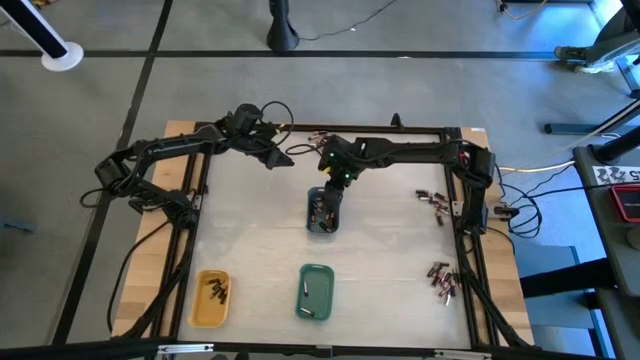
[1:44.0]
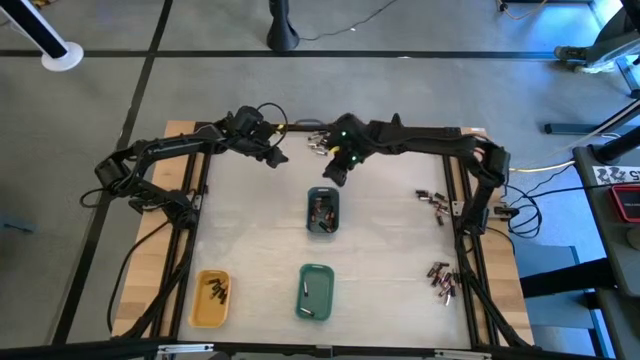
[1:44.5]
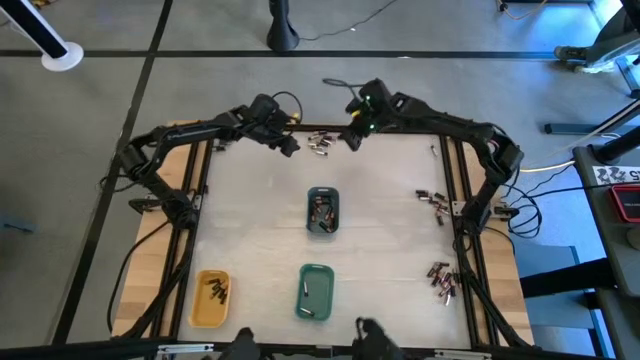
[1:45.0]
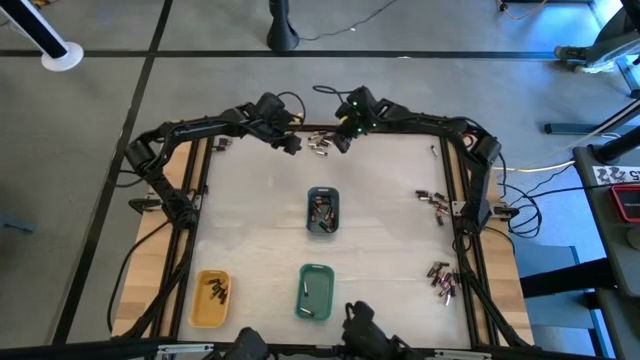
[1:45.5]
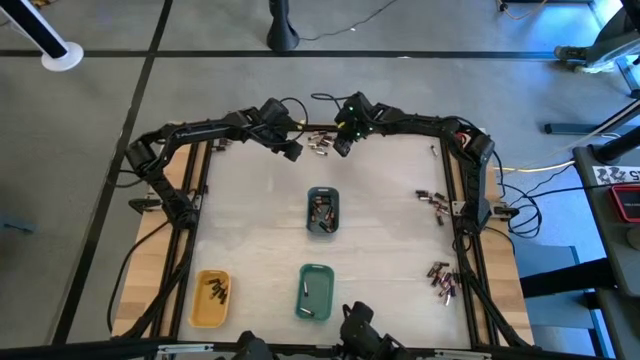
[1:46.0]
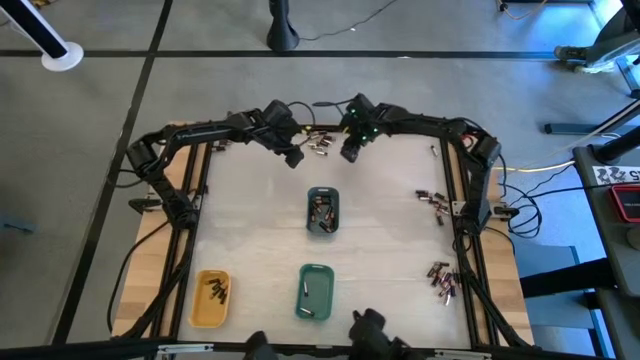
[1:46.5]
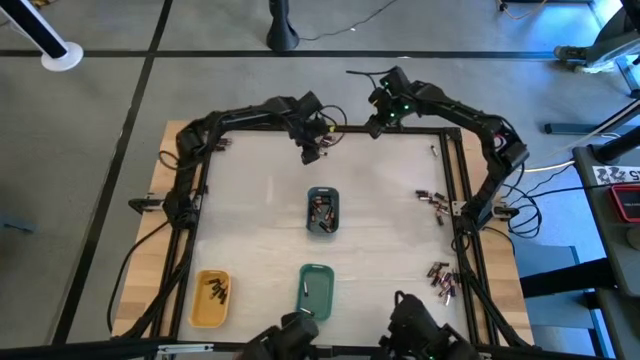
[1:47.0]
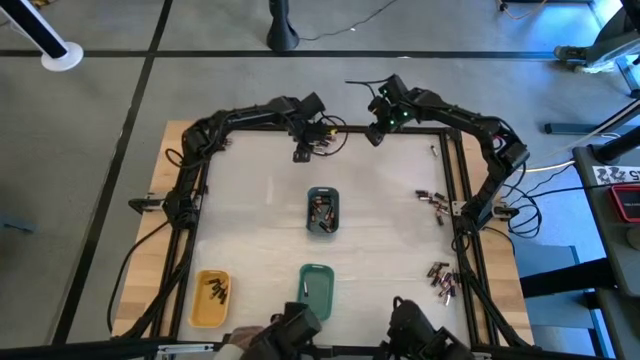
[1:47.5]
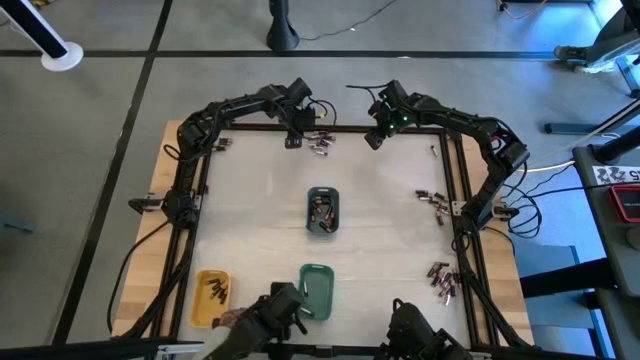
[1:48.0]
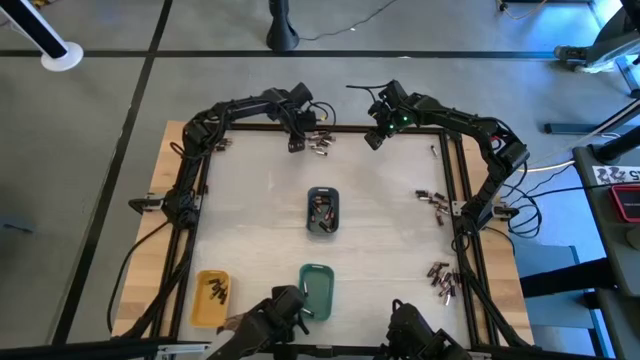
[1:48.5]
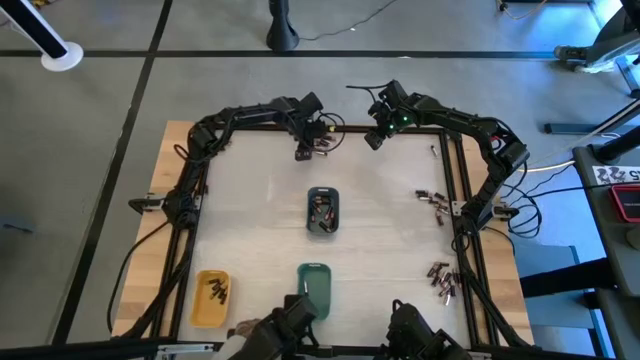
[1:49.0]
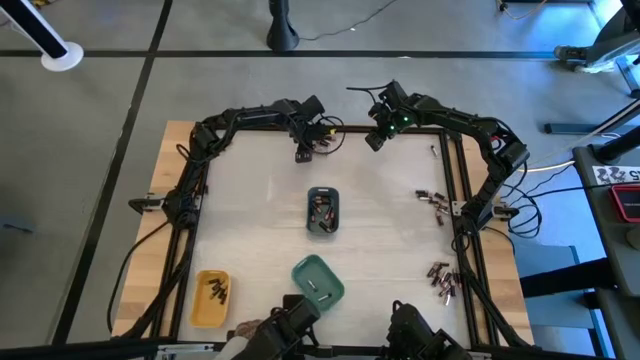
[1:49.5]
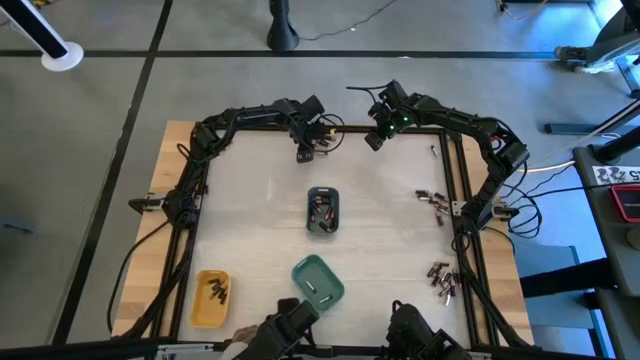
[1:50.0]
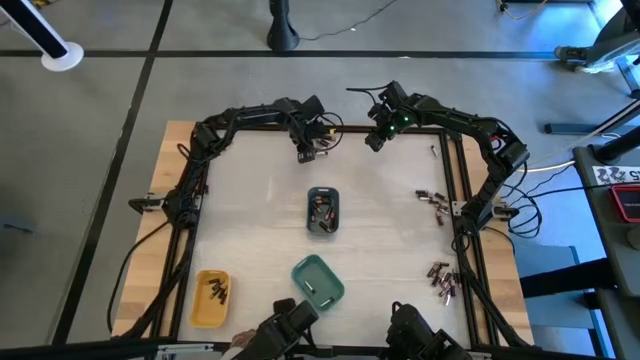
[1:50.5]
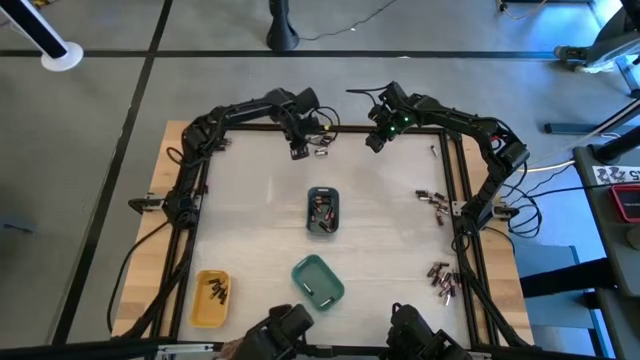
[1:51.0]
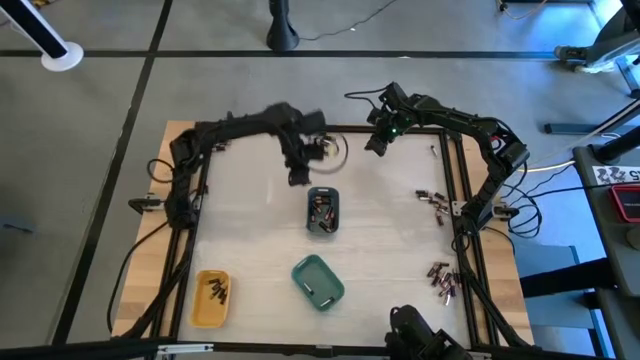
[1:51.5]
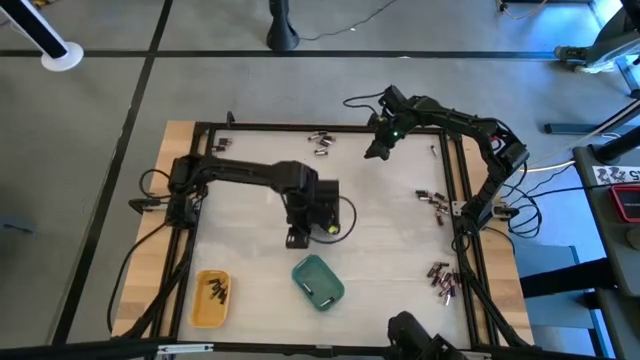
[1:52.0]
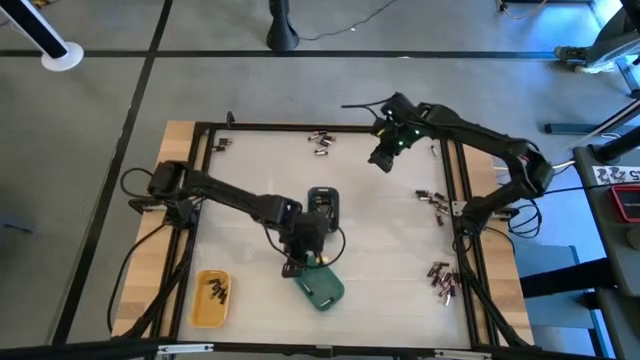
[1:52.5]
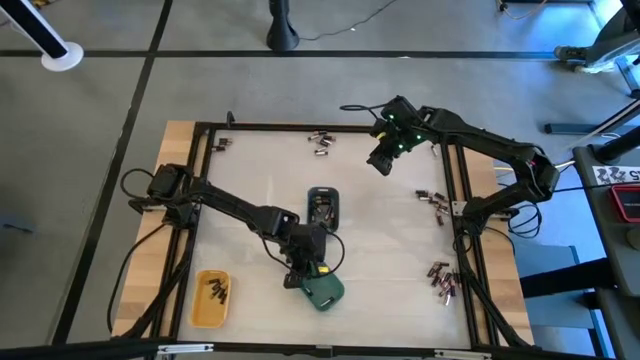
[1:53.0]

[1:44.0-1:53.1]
Task: Sort batteries
Put the silver battery into the green bin

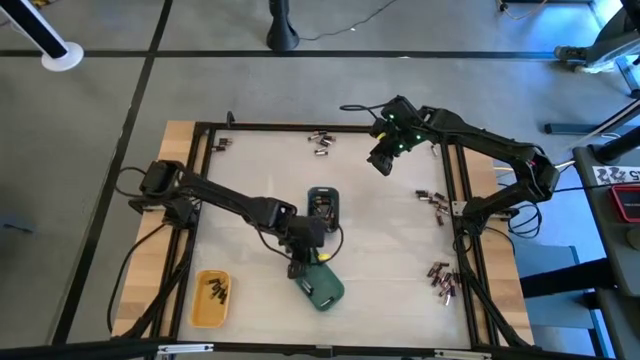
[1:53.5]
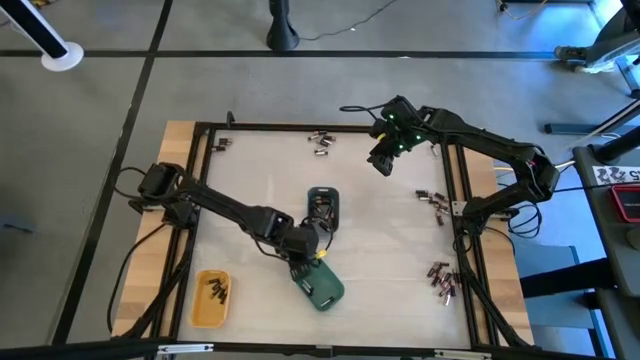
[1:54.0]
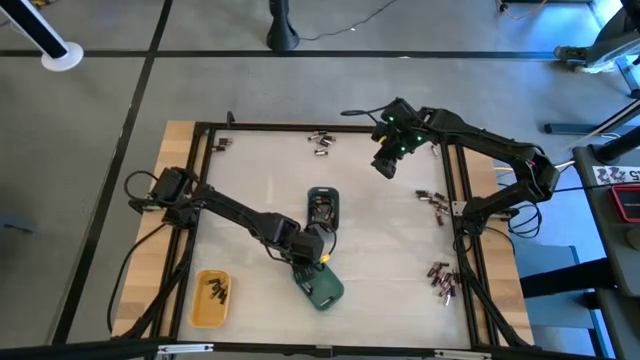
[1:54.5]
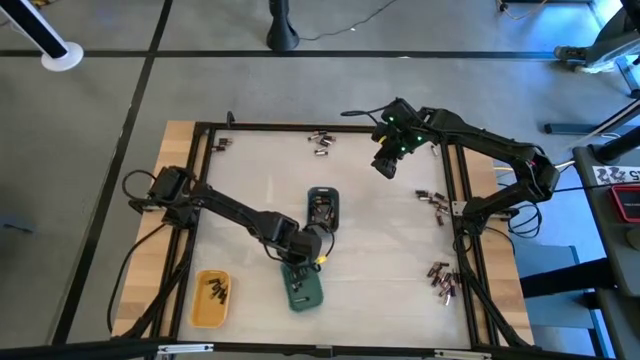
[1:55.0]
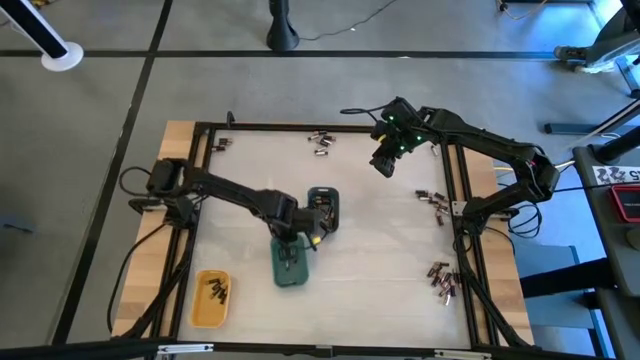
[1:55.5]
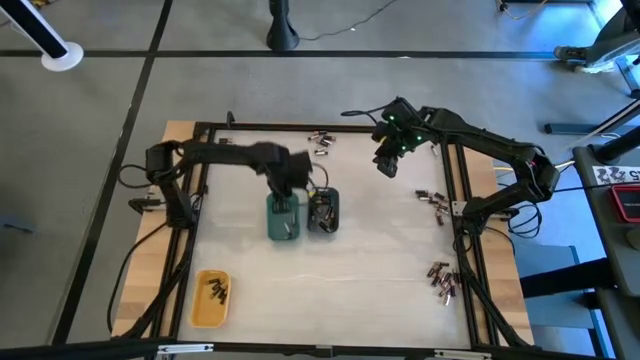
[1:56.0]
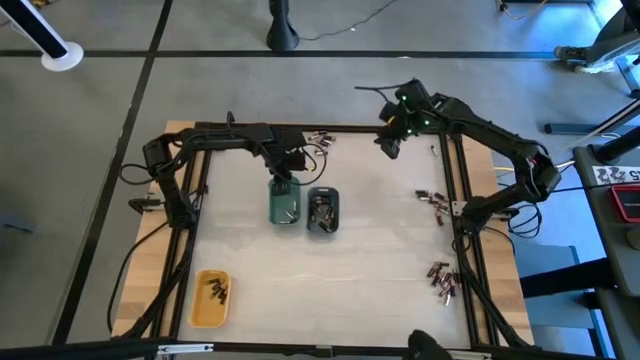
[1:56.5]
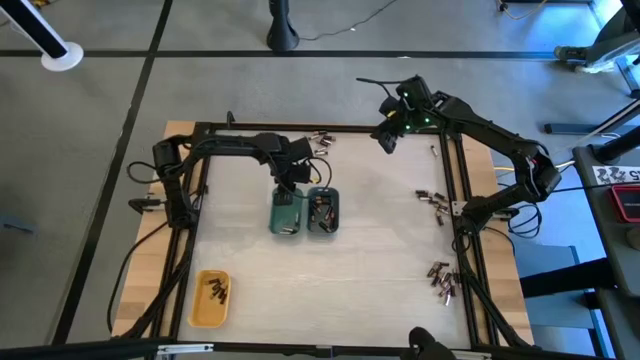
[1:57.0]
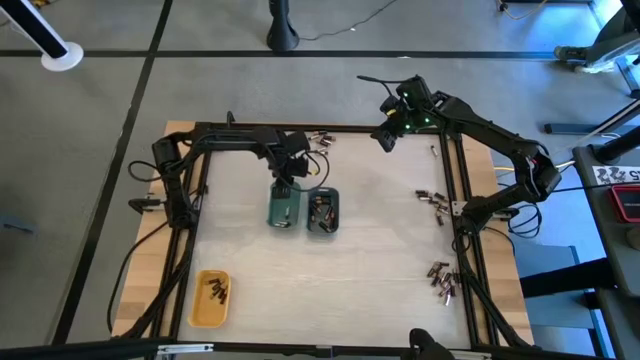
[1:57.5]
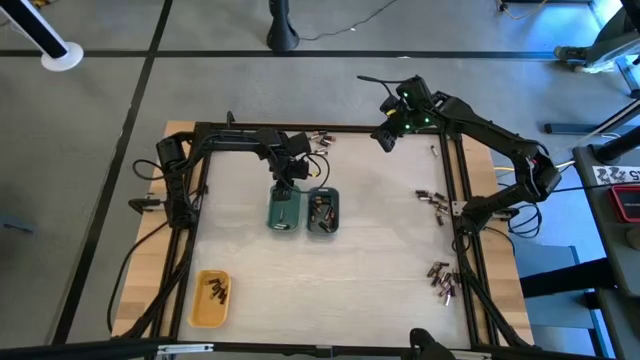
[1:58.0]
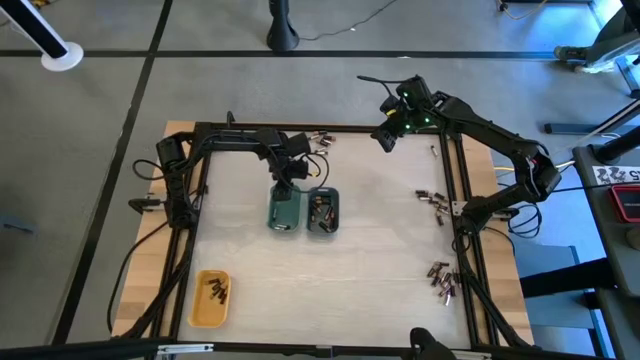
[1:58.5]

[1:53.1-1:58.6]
Move the green bin to the middle left of the table

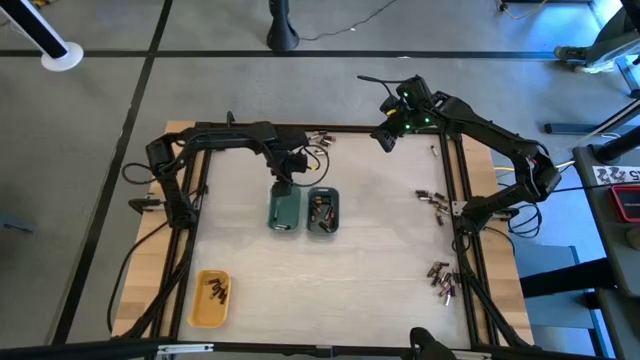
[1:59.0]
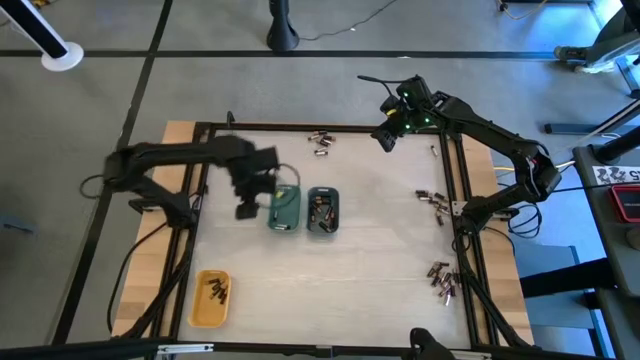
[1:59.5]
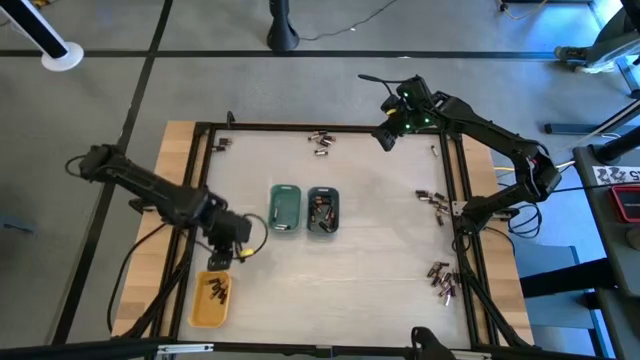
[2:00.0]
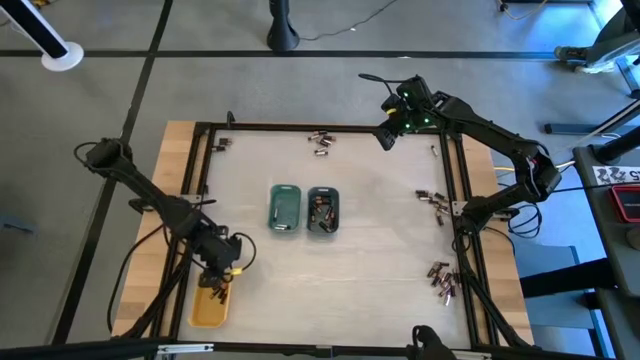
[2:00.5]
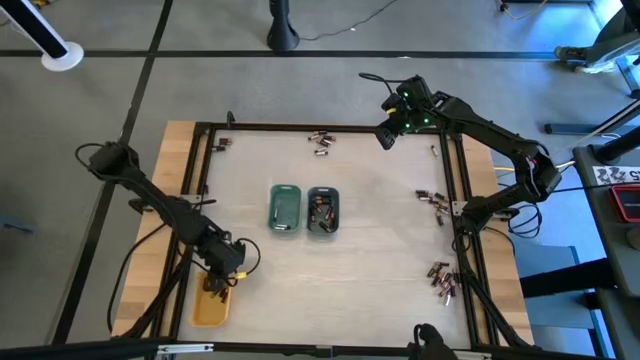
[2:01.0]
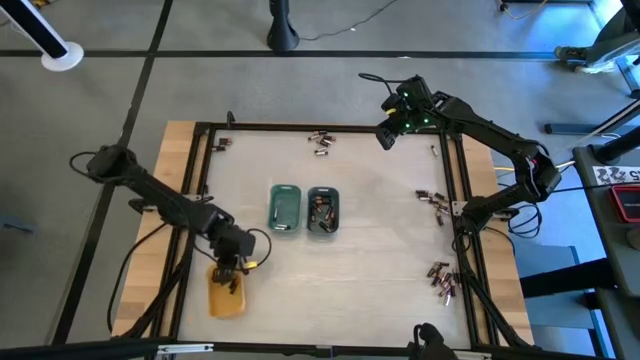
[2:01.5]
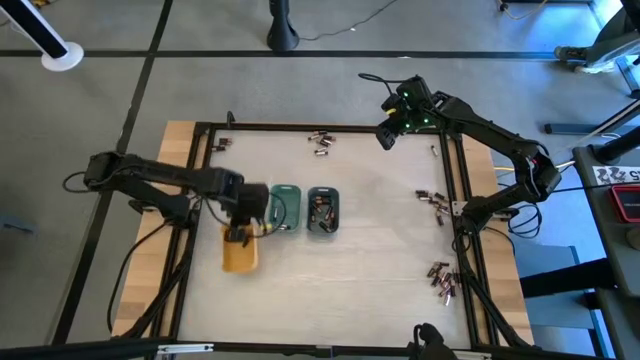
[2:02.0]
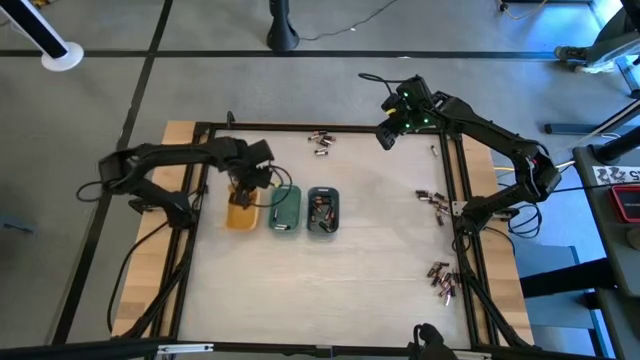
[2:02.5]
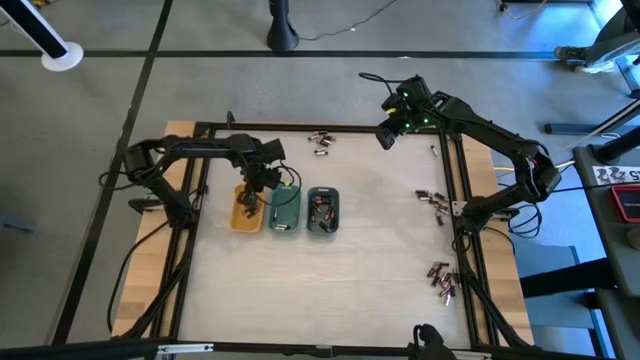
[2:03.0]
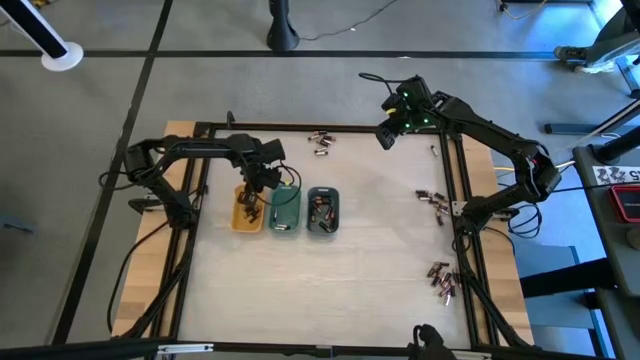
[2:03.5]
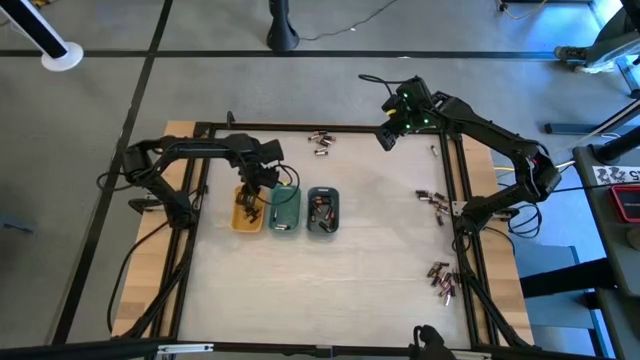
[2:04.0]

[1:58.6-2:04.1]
Move the yellow bin to the middle left of the table
